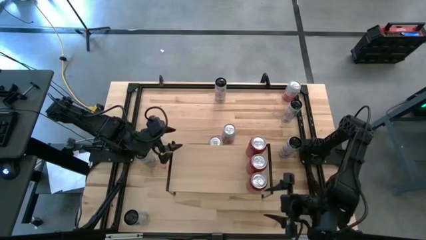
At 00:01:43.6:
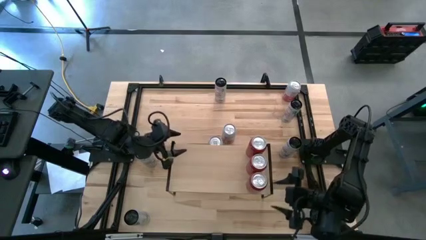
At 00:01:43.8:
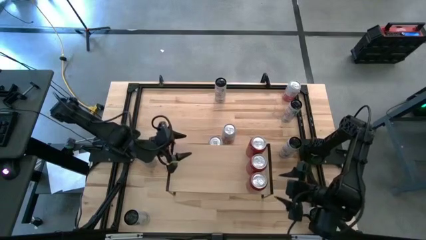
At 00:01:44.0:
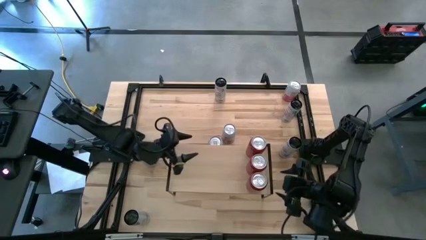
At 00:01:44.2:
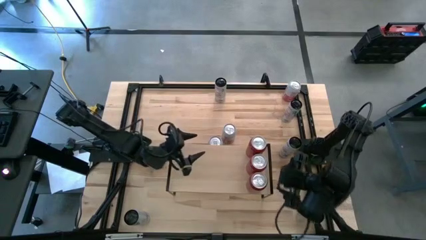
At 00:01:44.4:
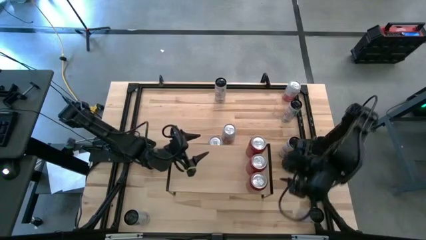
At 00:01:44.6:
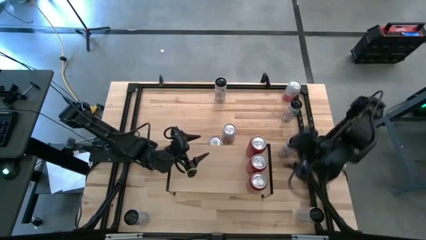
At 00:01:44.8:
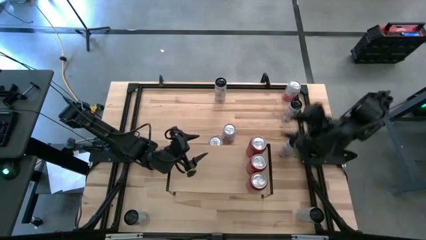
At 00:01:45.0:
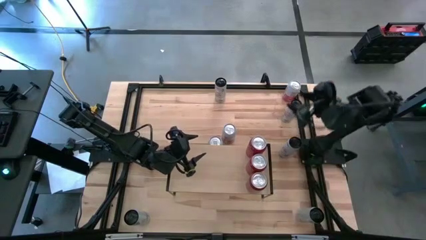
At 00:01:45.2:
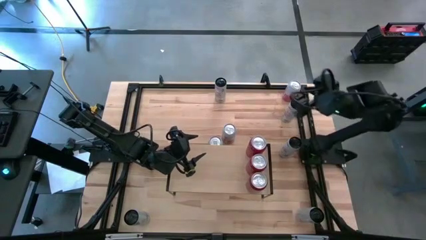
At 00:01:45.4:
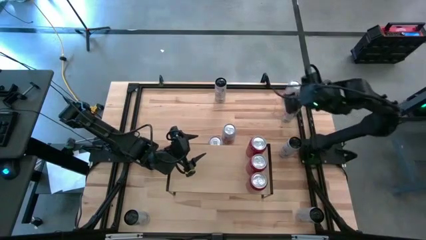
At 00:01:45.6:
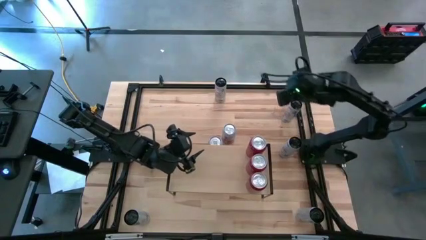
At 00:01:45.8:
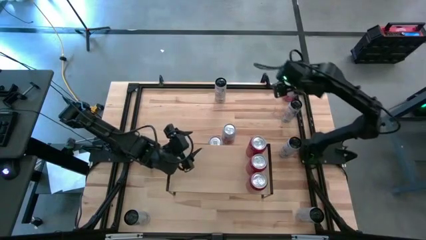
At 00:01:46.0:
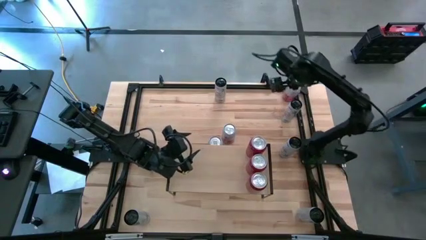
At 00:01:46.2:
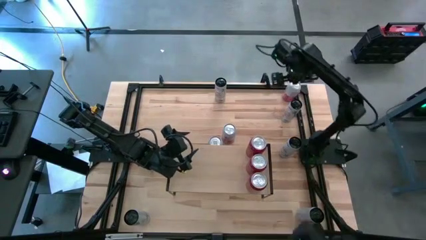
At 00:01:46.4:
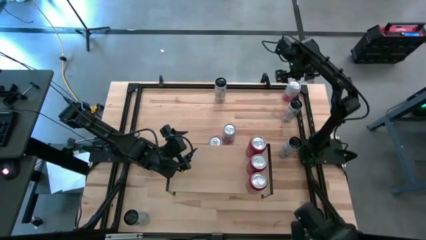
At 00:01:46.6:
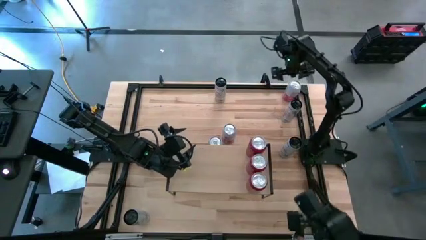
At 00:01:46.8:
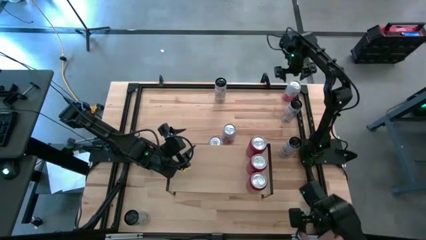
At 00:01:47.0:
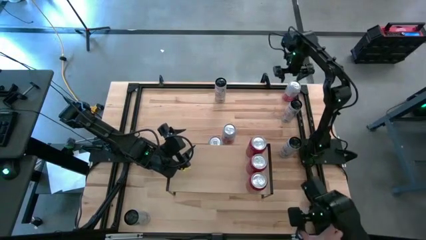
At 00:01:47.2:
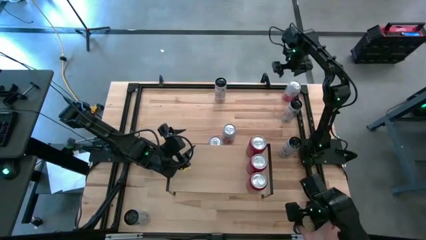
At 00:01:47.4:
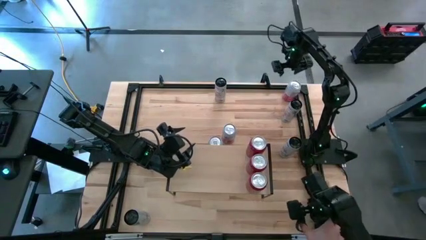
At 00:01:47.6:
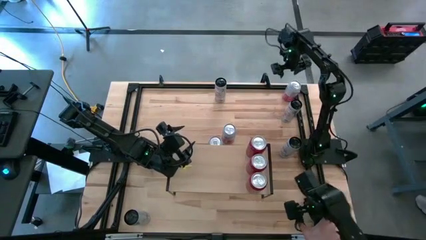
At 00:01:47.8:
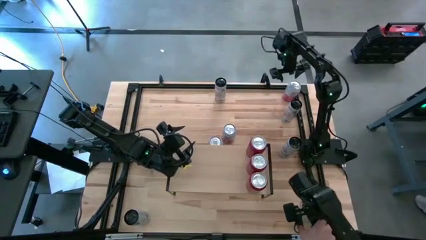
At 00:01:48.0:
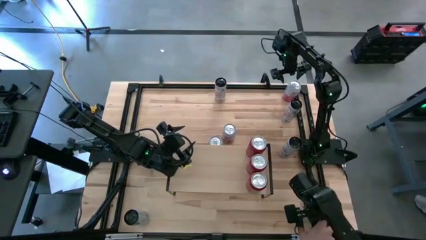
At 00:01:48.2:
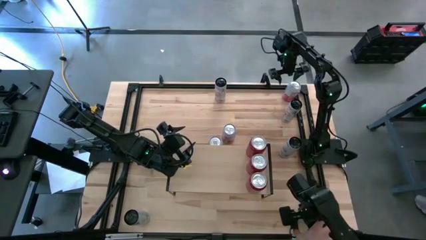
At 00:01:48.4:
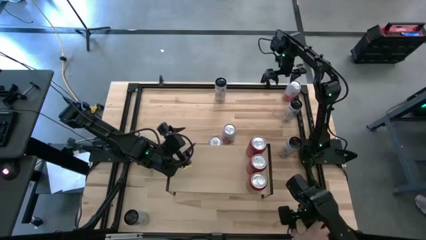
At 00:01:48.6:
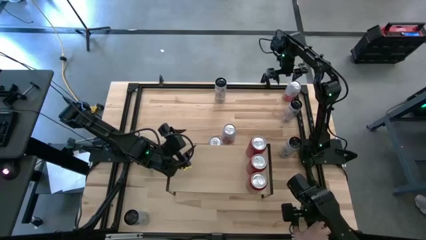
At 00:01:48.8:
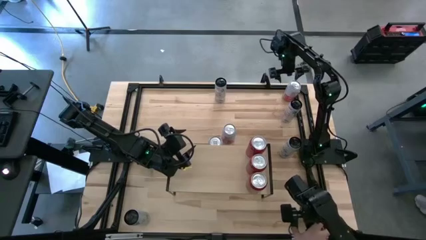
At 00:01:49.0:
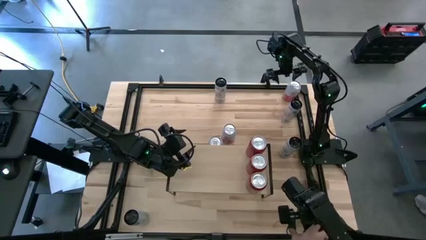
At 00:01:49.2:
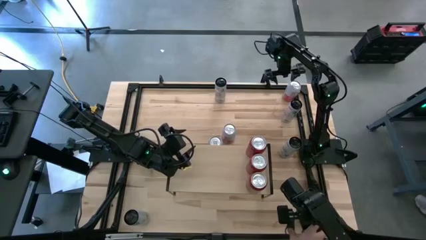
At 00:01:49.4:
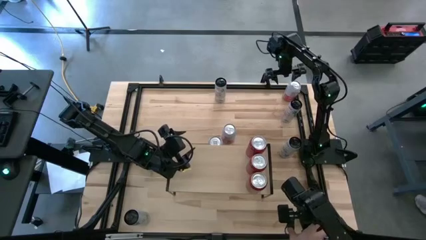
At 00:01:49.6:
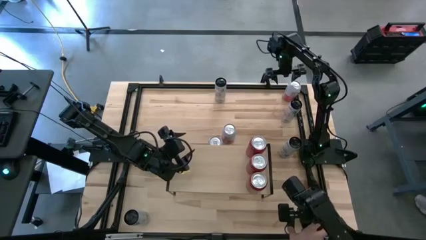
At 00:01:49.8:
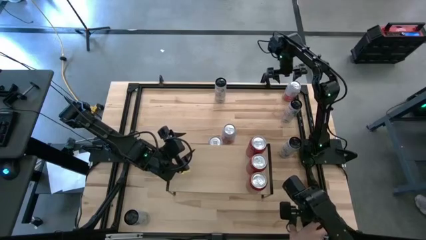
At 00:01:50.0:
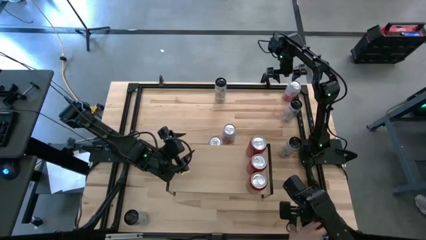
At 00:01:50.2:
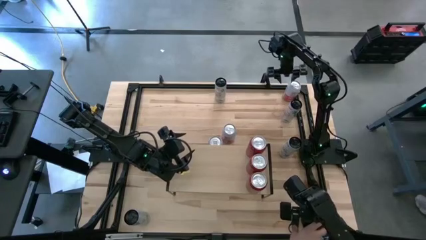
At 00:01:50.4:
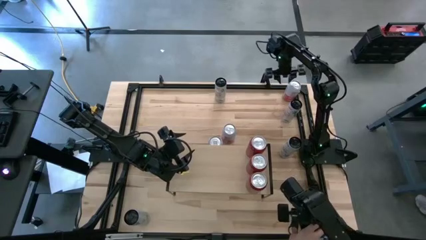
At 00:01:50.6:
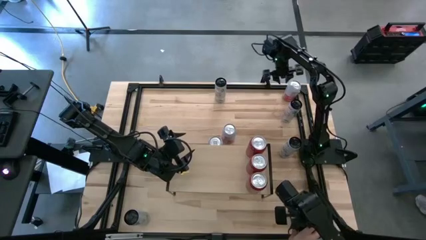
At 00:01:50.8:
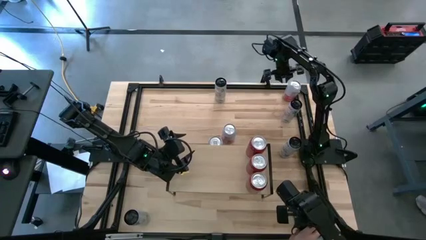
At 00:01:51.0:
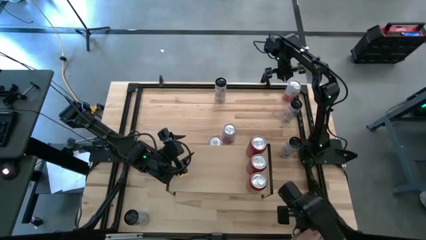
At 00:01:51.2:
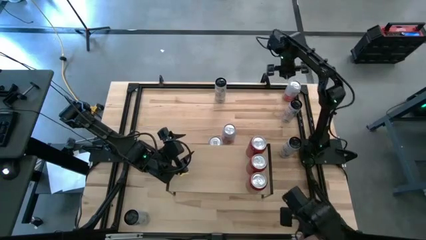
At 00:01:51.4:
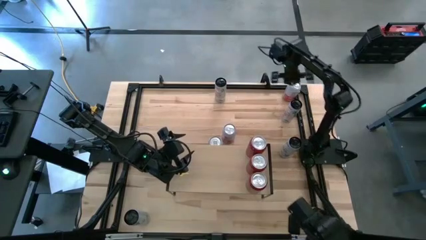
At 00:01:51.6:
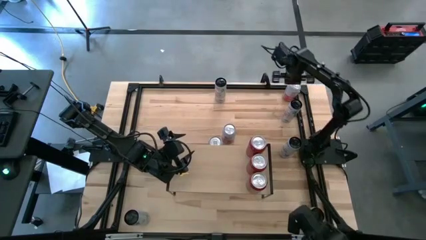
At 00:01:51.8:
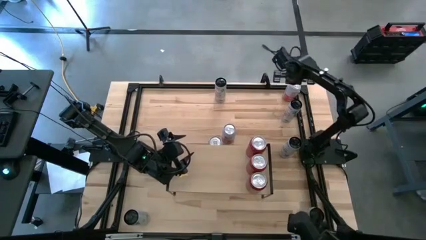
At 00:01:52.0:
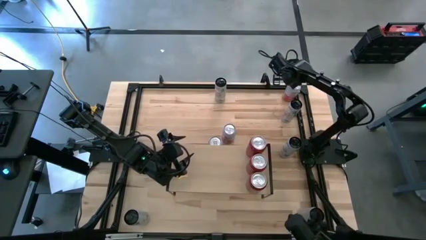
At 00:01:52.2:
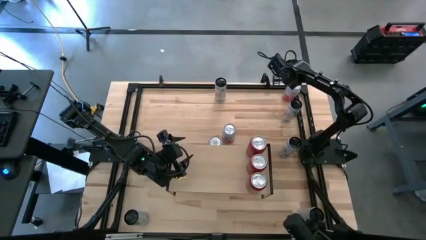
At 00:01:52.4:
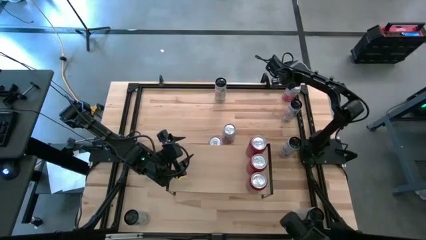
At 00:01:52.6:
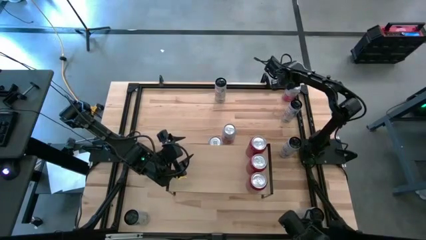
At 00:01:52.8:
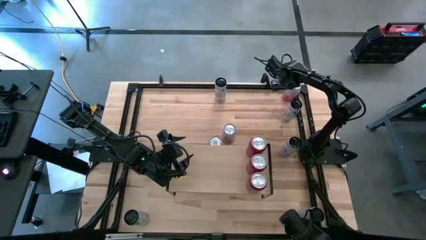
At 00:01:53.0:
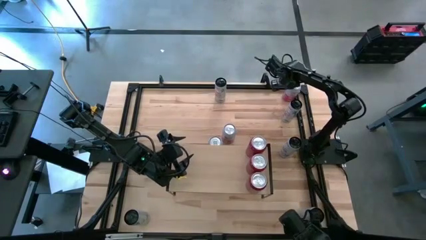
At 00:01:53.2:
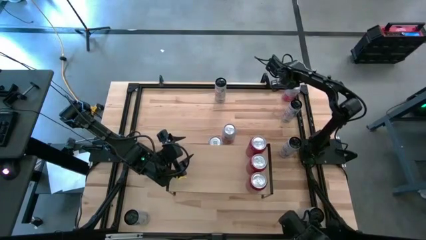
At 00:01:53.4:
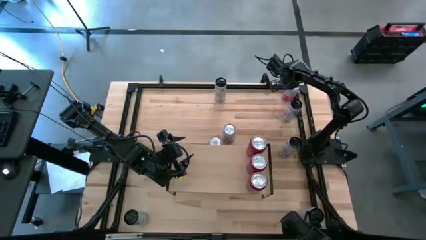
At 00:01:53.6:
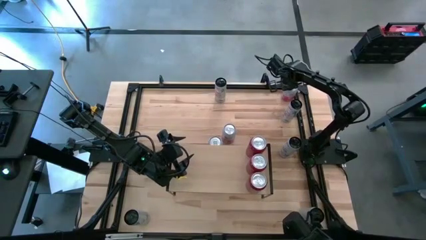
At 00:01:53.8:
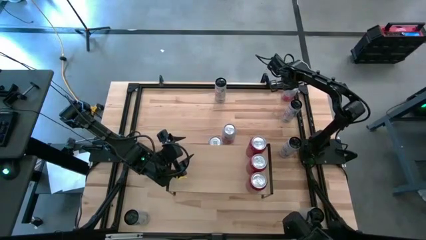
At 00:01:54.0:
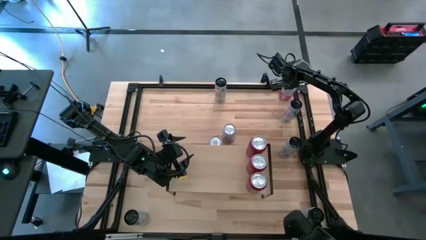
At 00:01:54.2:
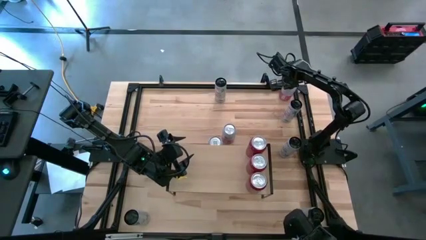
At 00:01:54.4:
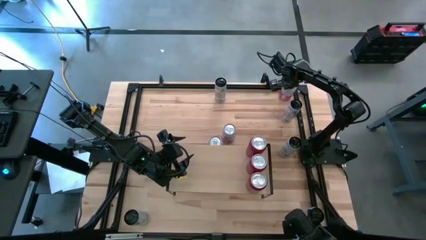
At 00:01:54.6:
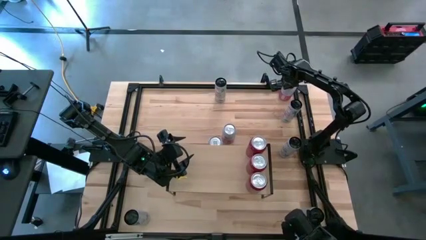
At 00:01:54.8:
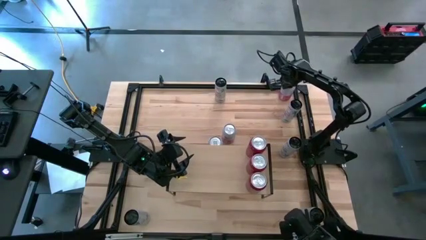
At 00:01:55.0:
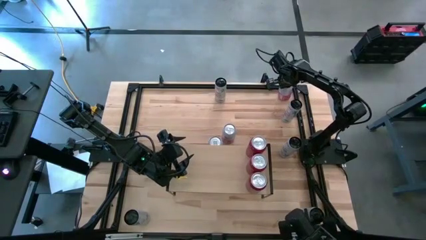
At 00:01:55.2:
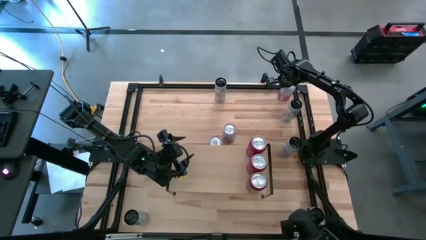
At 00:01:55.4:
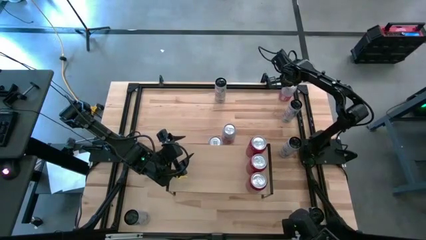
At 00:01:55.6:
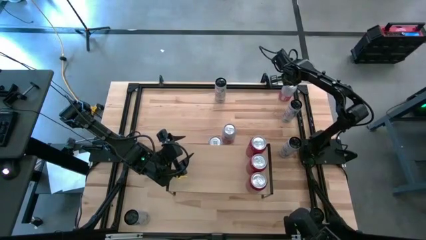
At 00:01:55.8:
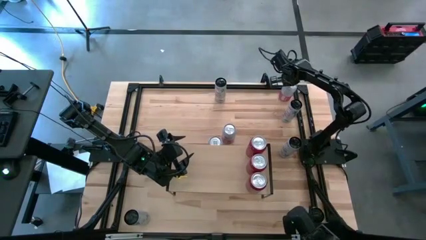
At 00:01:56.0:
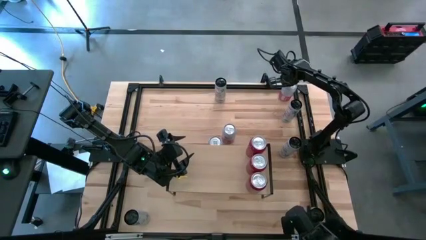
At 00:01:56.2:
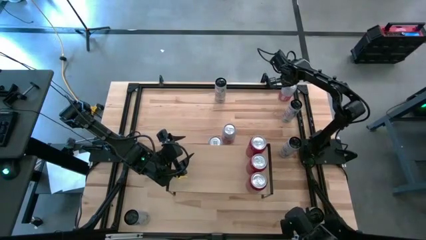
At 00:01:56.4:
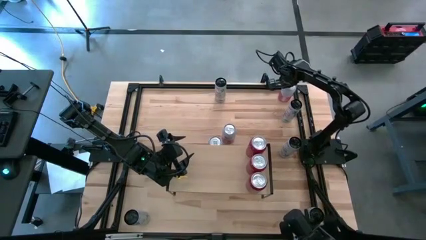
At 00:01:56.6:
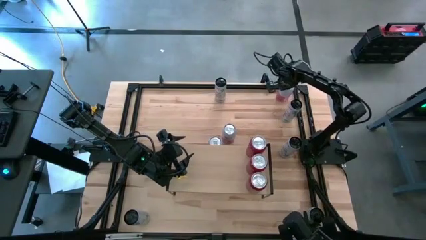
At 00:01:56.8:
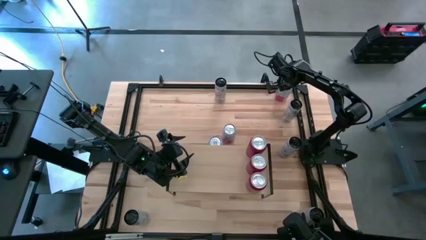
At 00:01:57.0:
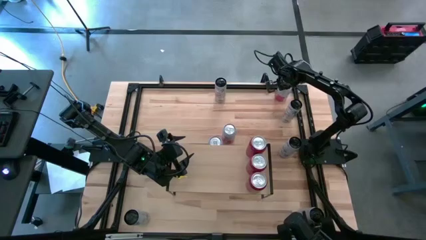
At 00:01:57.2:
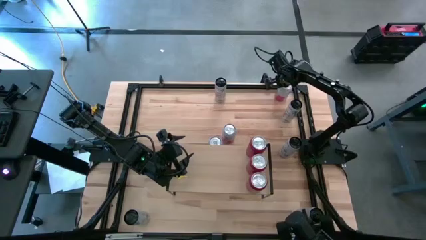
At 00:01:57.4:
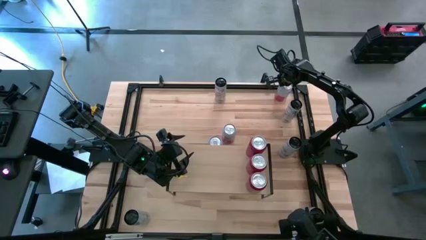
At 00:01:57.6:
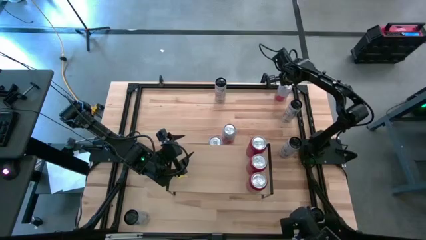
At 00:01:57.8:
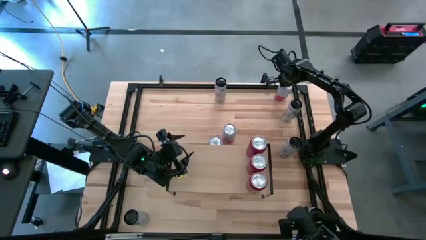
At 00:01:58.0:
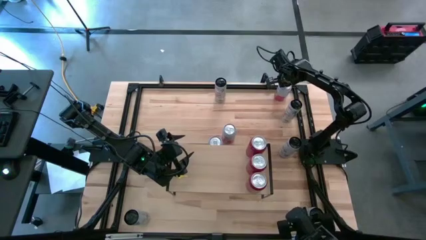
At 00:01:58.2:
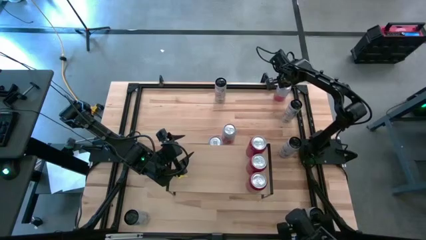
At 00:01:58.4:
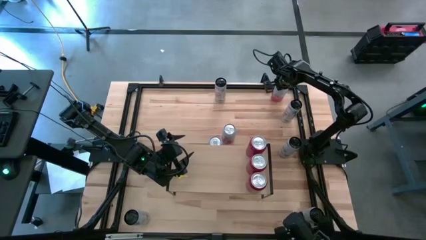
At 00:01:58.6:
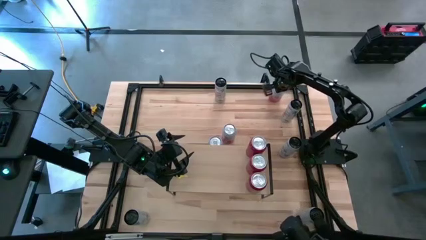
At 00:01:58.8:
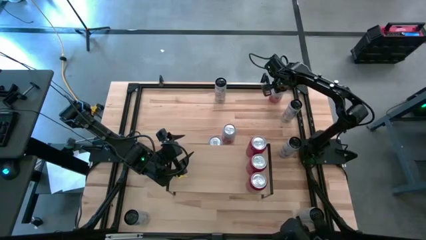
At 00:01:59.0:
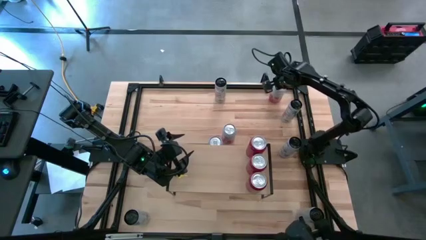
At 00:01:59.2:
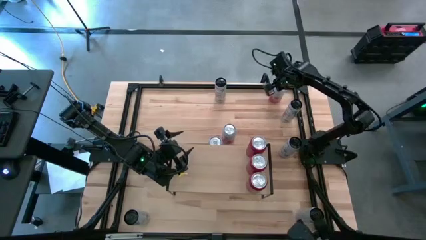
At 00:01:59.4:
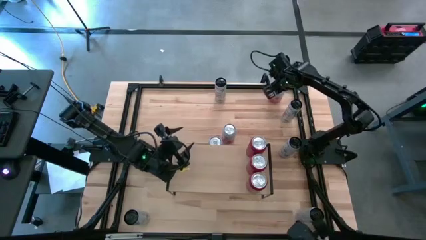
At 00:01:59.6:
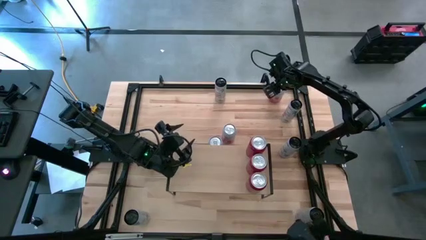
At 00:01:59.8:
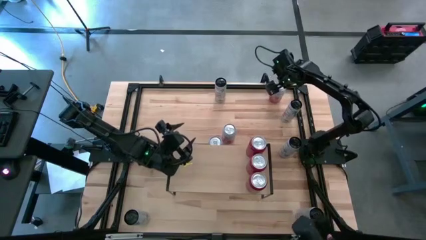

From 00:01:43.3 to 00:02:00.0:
Task: Place canned beverage on shelf
Put the top pink and white bottle on the shelf
